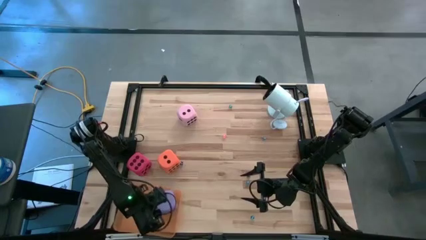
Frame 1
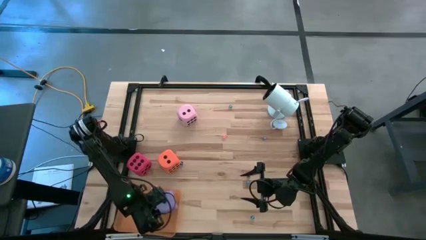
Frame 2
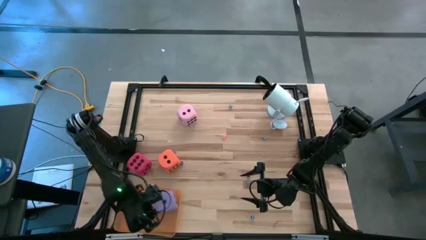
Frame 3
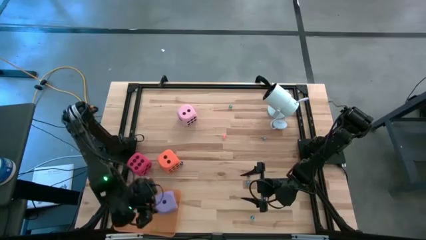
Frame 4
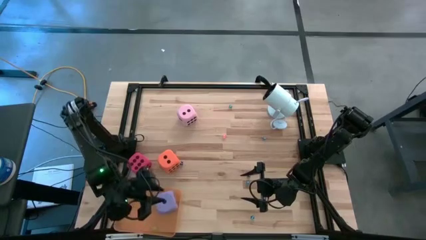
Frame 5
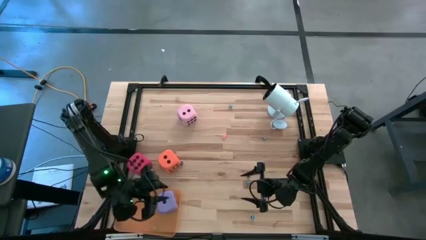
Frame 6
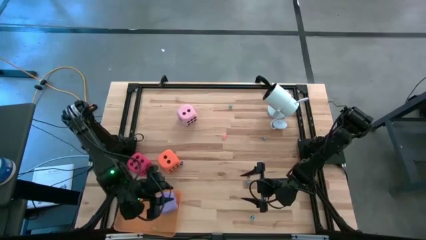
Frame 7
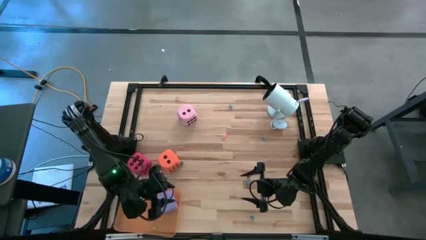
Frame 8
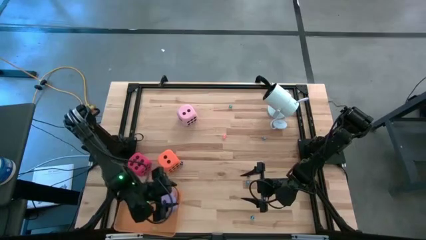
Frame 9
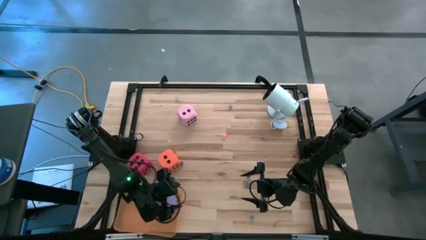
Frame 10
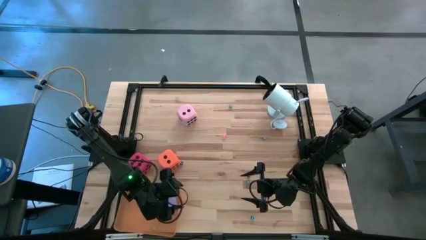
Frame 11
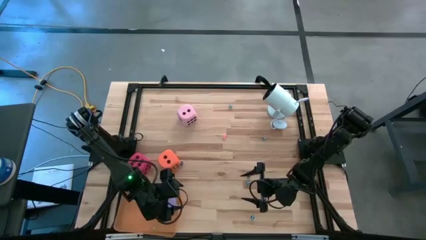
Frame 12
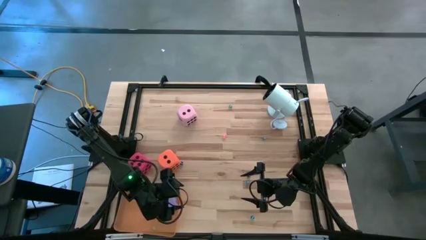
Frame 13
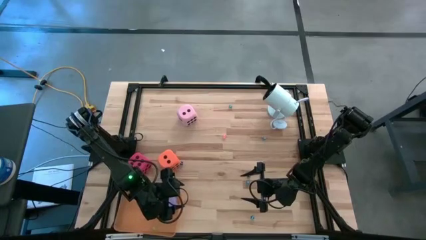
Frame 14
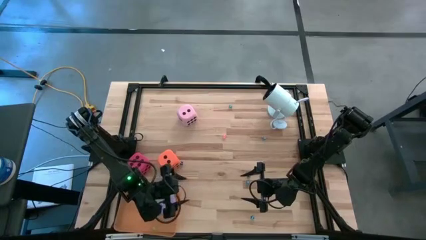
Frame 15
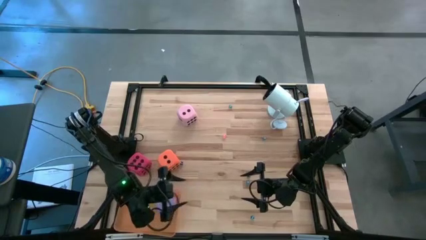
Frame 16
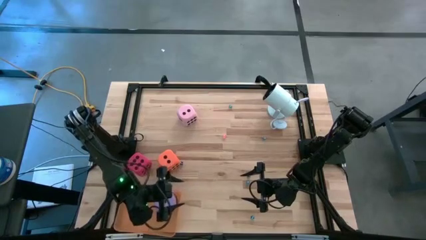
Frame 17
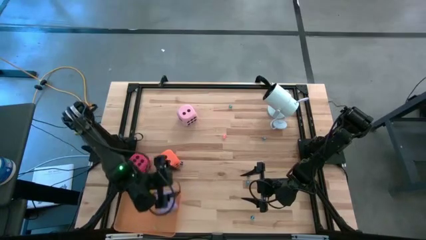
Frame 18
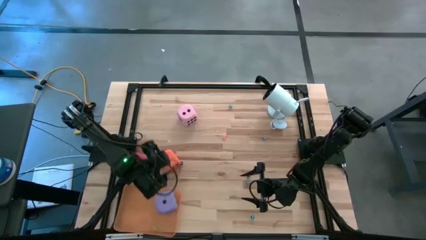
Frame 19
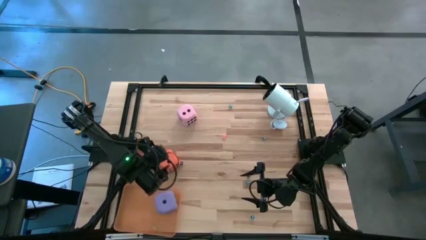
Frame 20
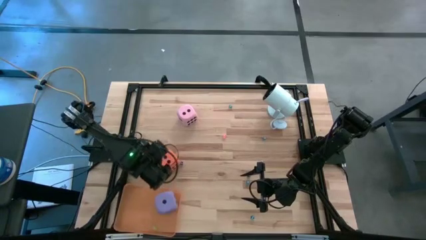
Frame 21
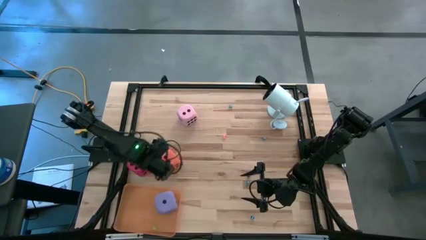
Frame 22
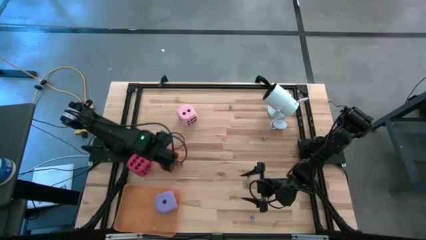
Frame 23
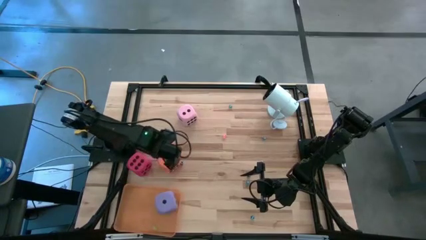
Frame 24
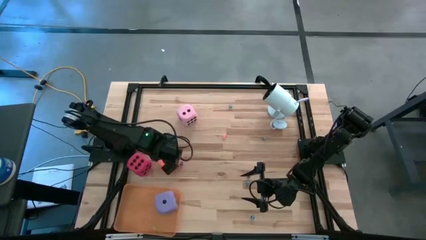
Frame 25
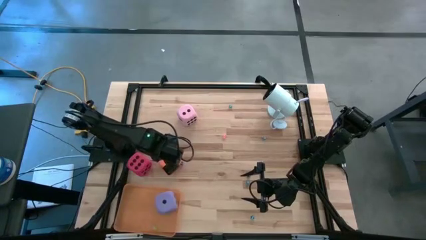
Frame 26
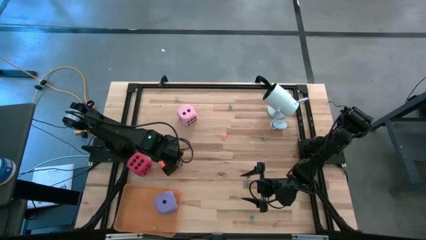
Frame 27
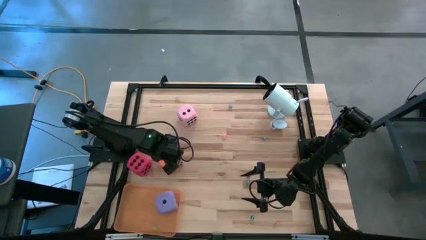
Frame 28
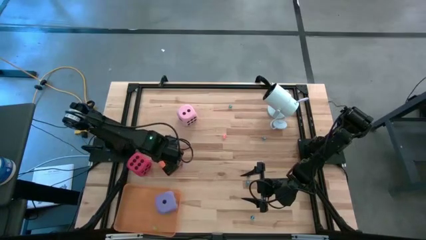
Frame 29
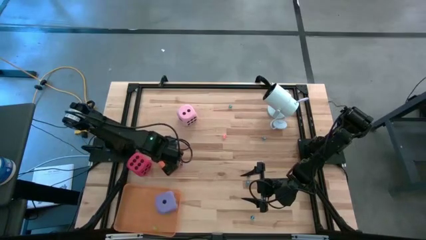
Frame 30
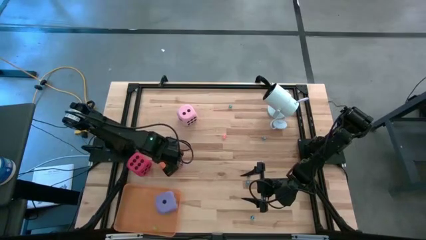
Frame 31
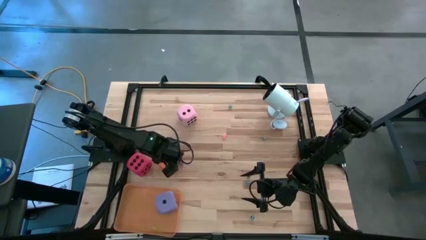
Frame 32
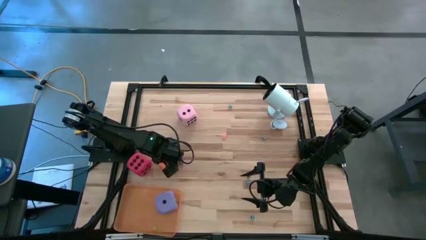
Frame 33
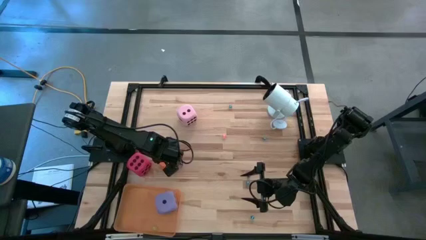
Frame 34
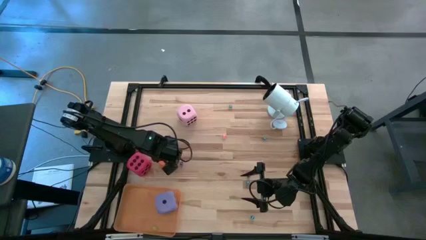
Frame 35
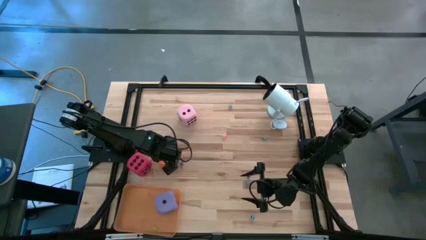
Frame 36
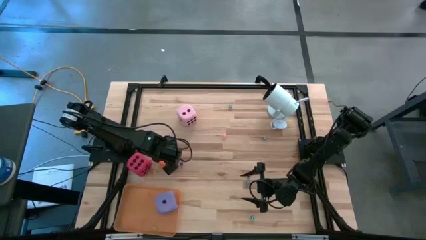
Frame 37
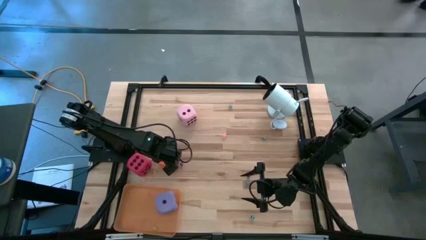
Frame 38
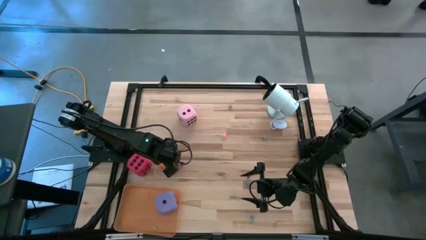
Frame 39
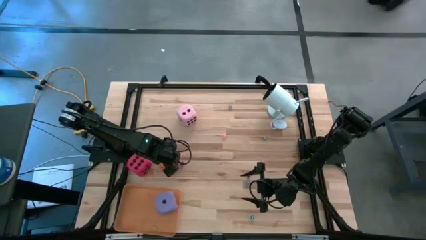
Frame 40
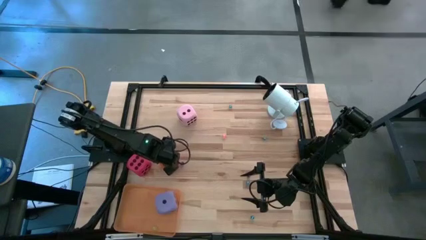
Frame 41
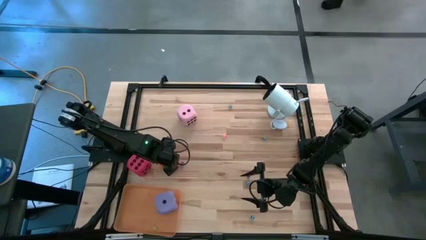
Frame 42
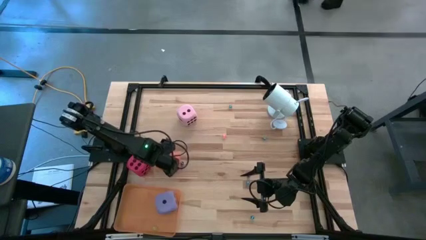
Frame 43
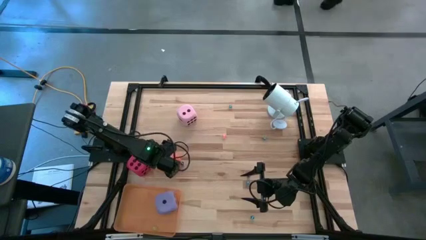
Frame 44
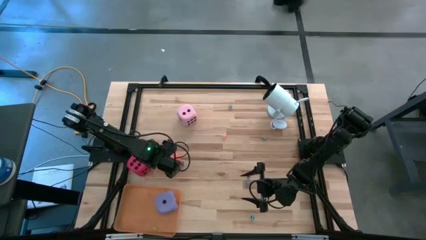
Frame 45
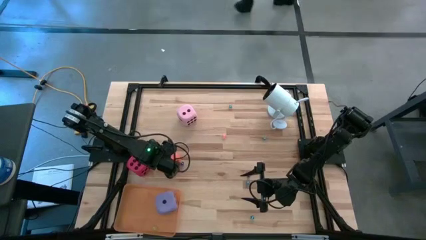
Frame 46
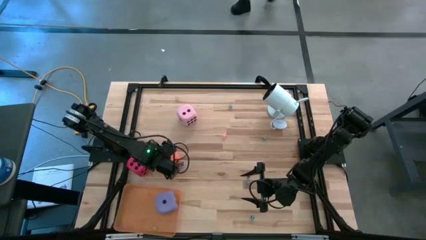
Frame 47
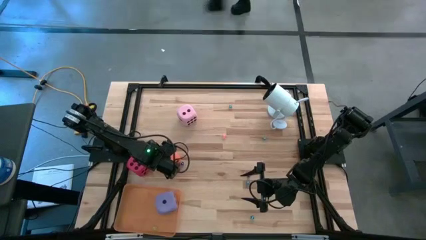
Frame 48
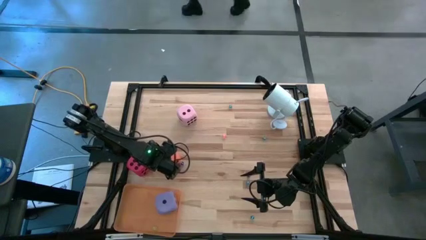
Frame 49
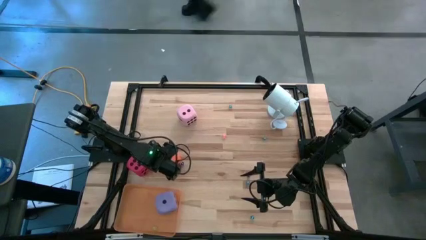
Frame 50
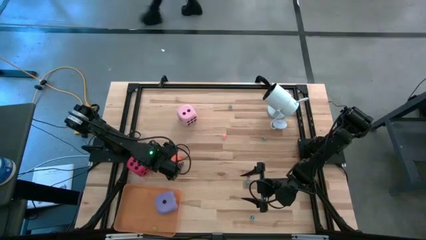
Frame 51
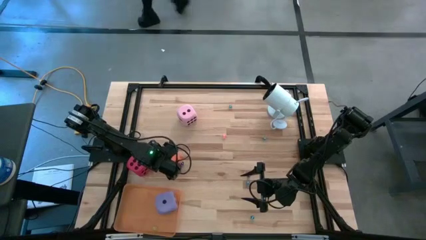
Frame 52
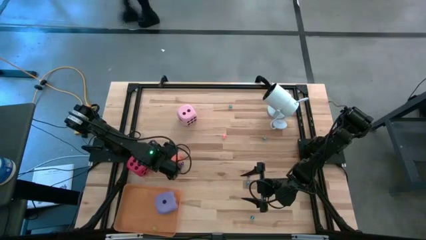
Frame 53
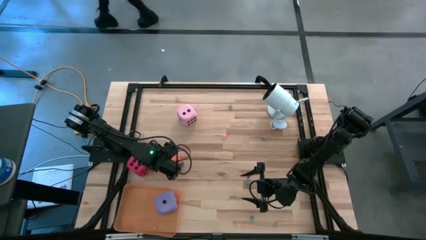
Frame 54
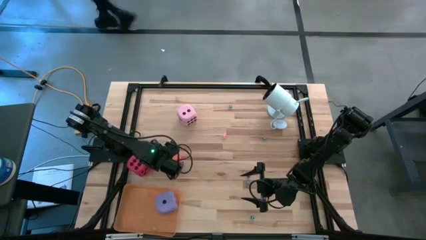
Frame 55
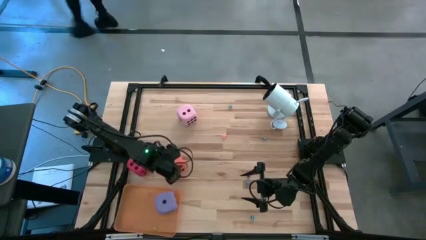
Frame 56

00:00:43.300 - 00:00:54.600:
Task: Pick & Place Dice
Put the large orange dice into the orange bin

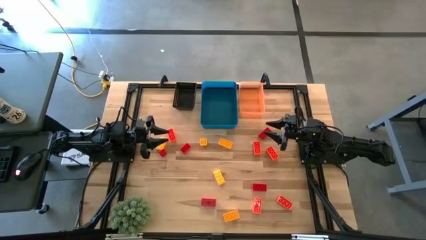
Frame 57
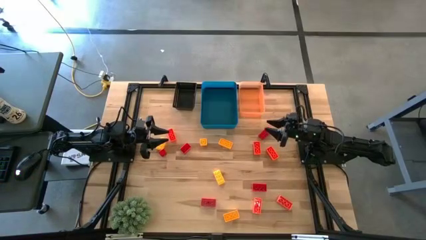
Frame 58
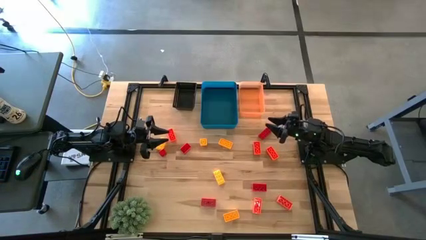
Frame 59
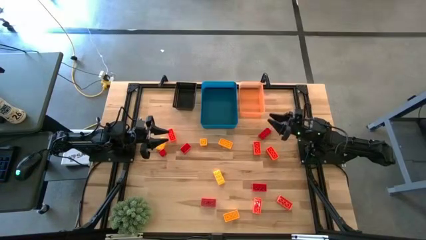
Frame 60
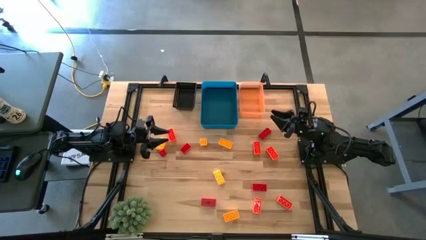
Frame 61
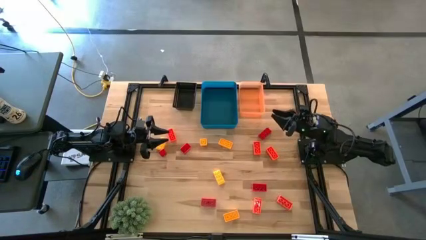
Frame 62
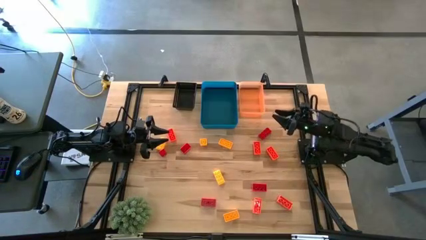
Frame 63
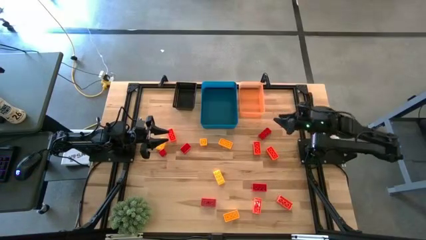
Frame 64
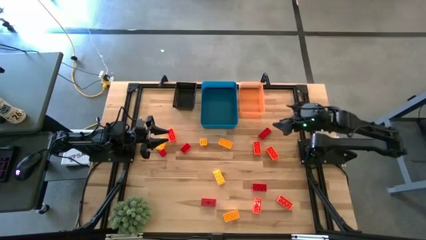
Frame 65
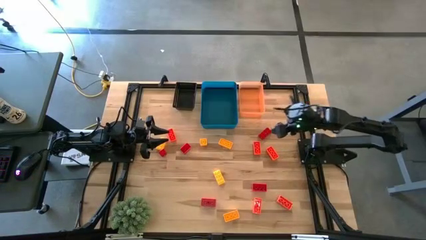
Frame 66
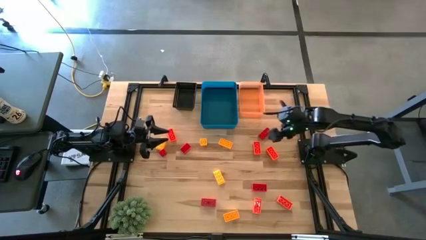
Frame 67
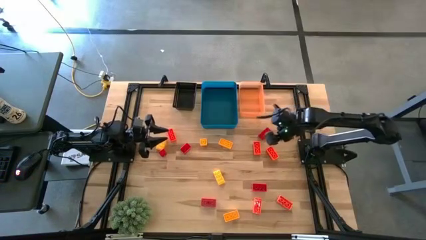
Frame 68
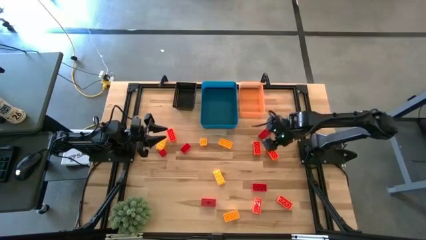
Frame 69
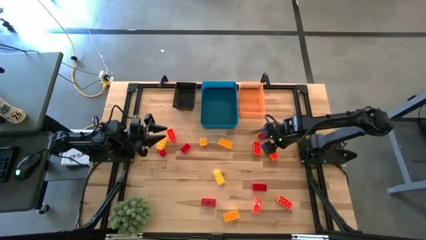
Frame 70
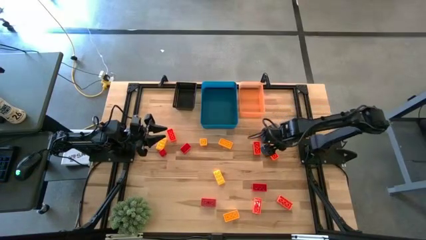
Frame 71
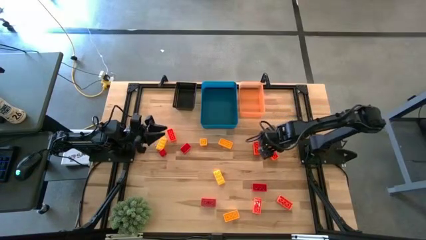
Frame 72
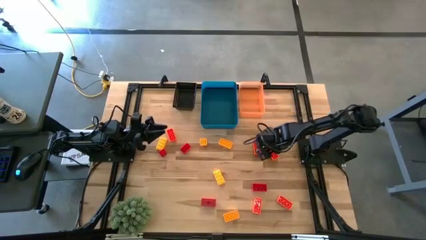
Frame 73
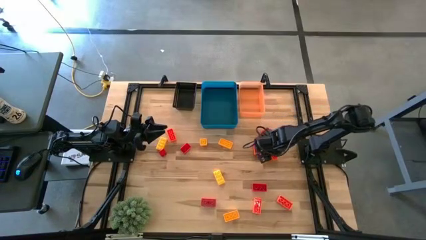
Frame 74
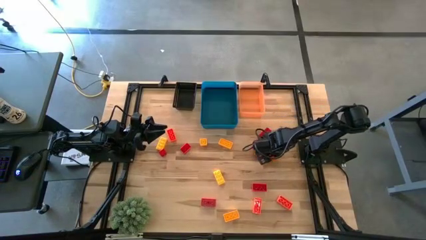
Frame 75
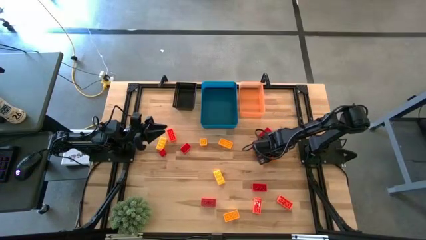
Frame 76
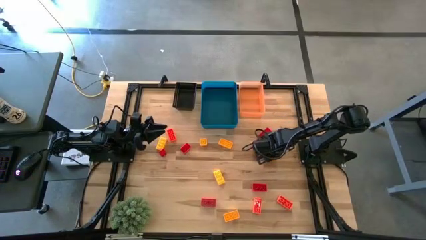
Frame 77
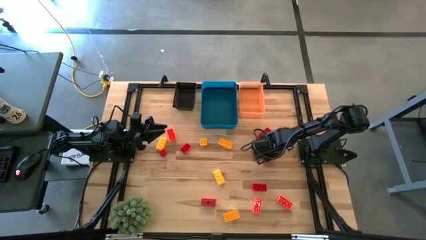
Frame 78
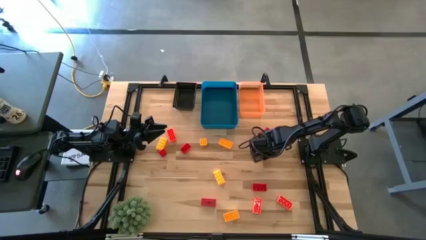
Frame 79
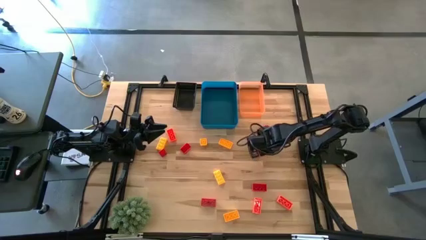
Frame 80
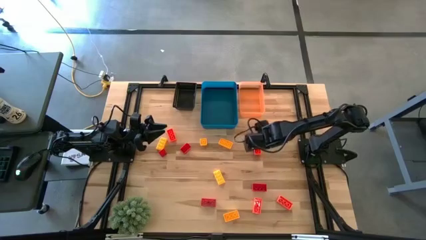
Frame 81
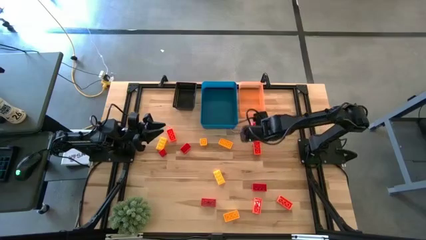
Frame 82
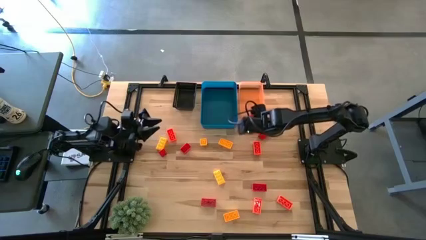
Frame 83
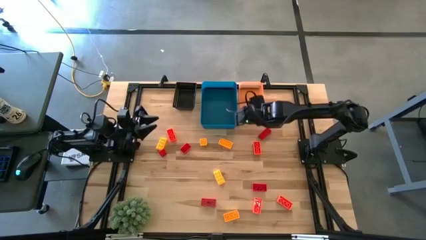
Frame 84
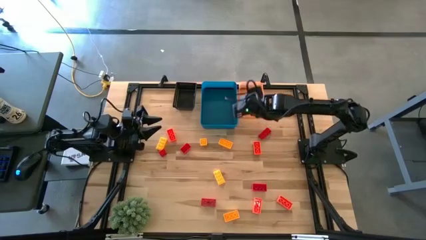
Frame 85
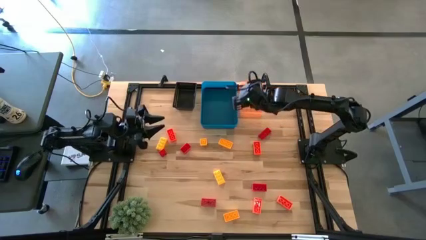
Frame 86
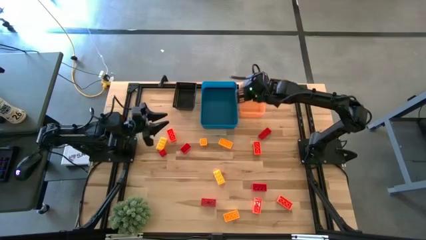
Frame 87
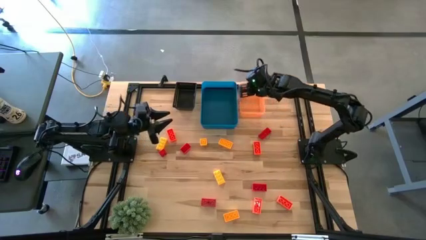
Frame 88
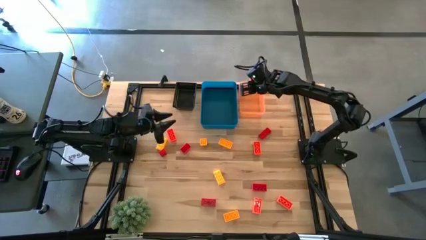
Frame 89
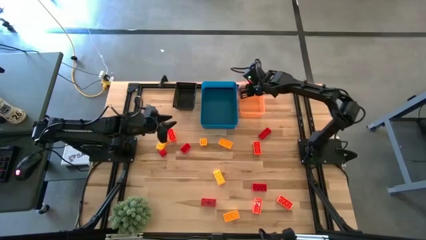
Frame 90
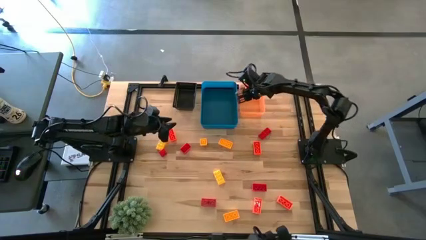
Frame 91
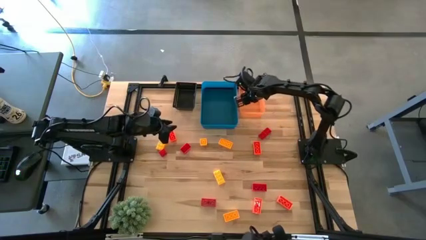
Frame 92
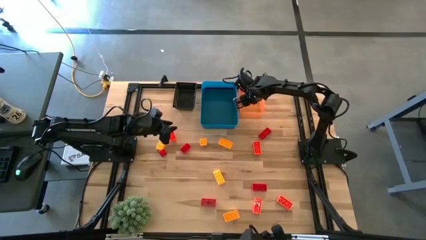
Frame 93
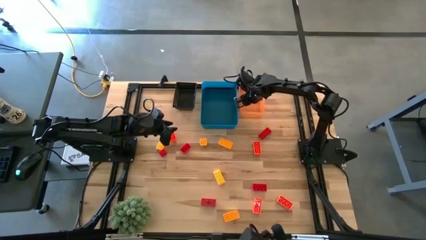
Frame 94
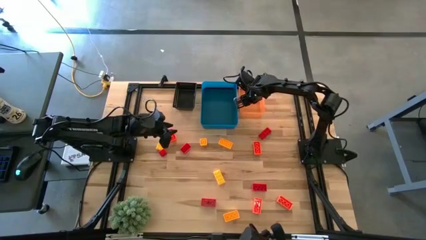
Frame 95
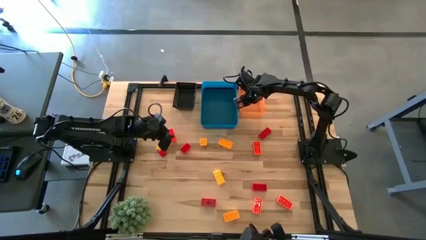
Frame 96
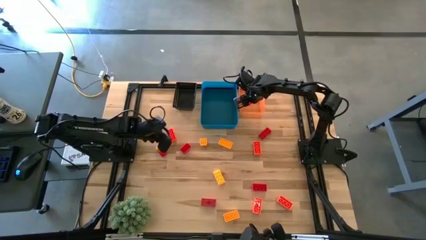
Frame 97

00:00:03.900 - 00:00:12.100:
Task: Sort & place blocks by color
Put the orange game piece into the orange bin
